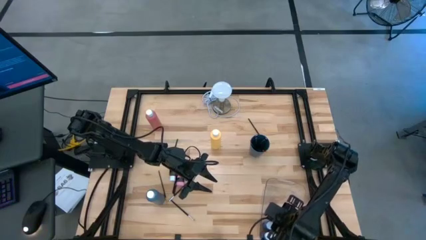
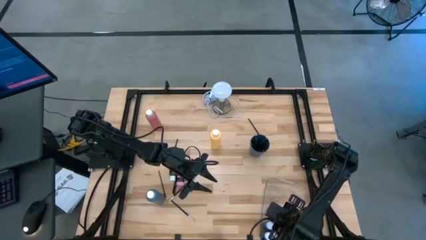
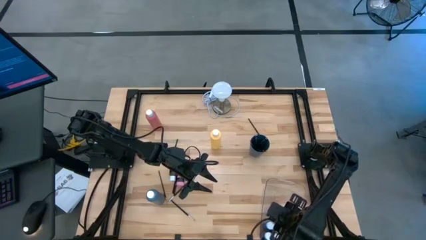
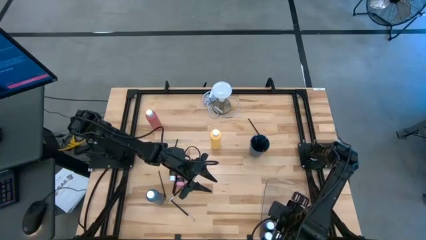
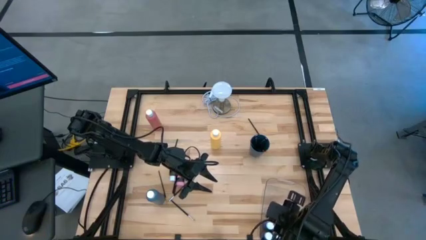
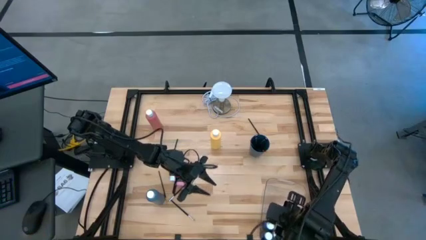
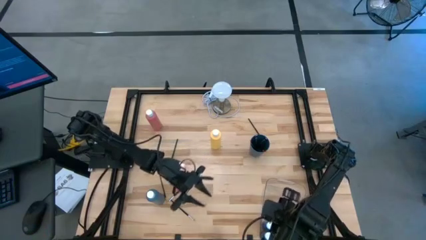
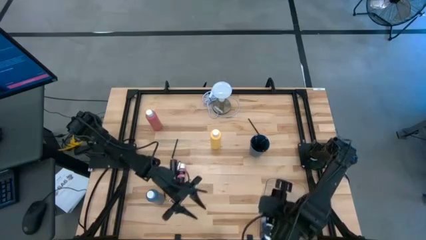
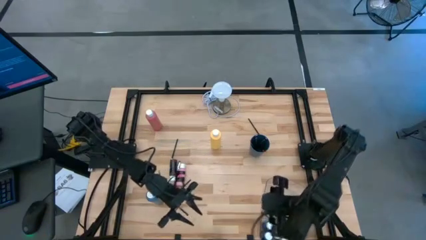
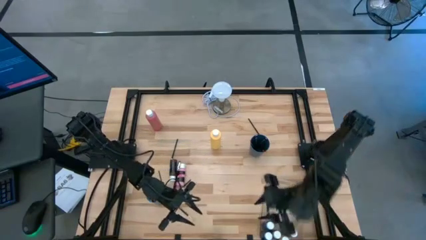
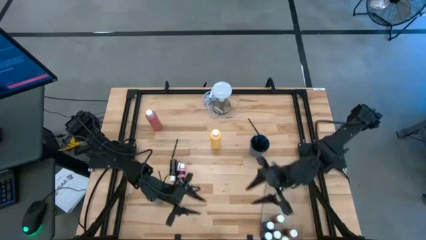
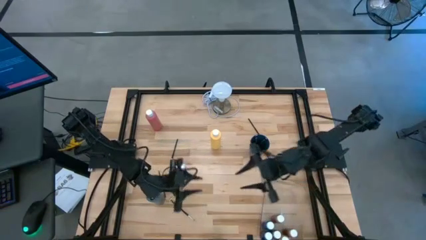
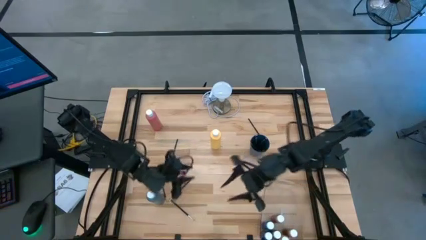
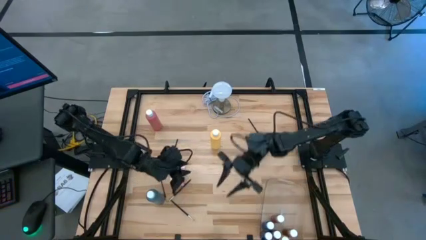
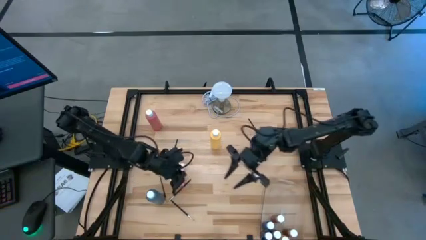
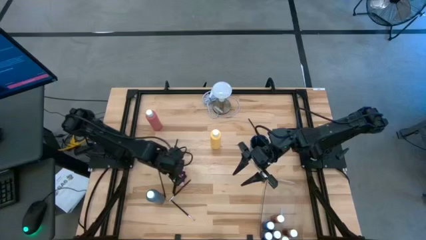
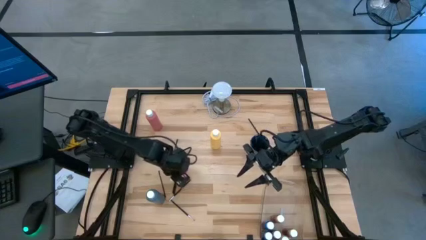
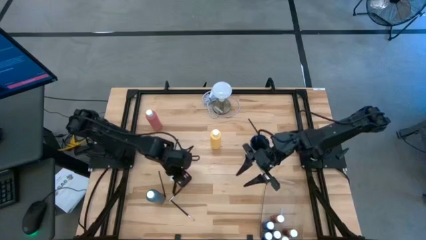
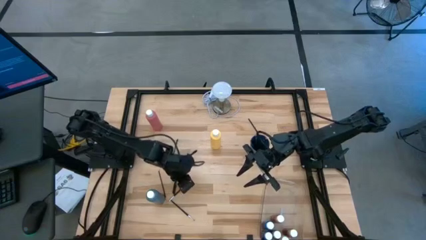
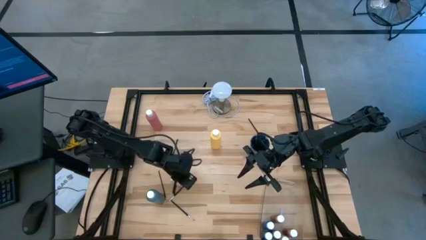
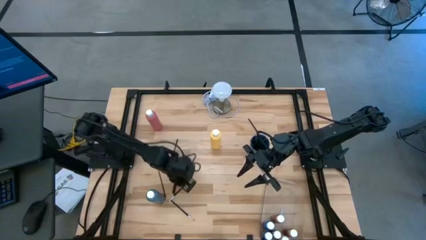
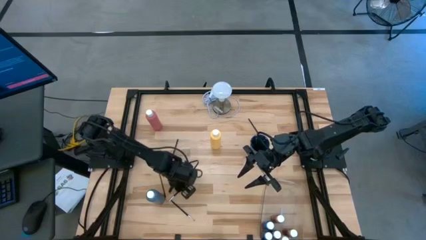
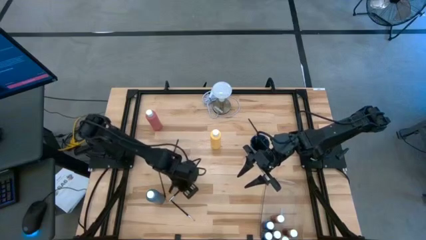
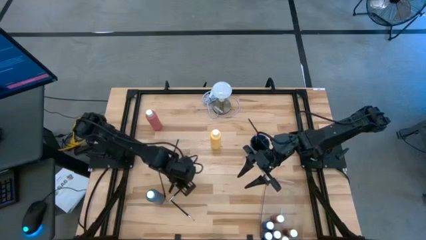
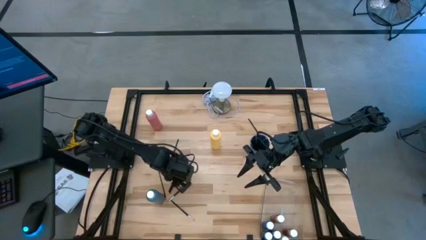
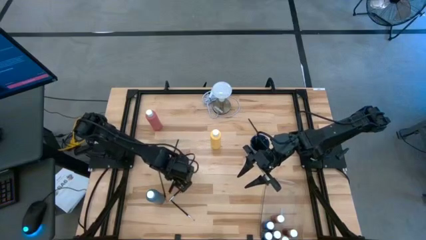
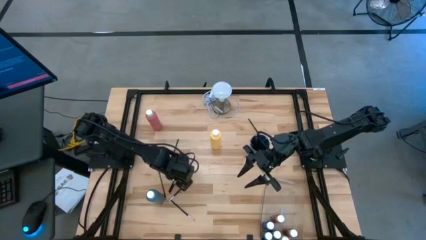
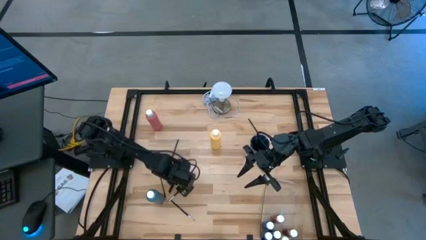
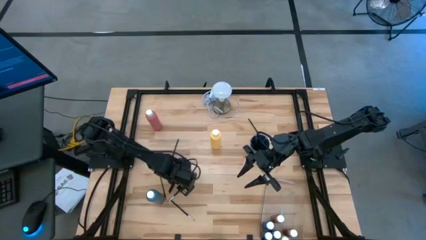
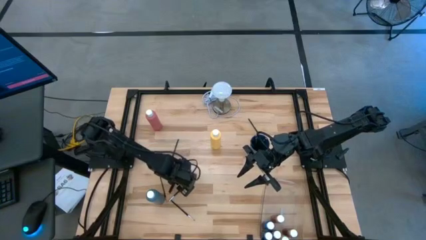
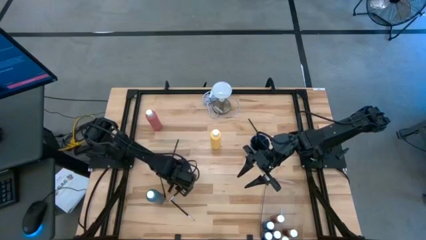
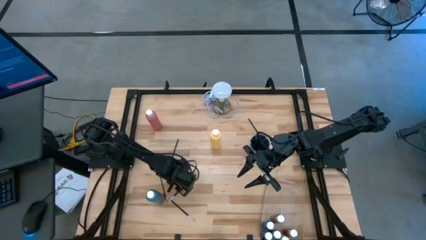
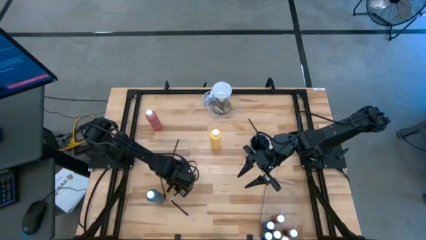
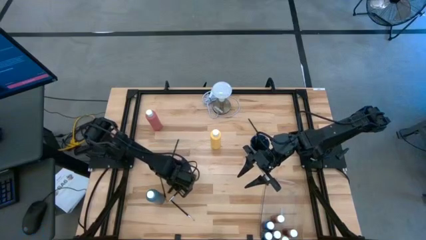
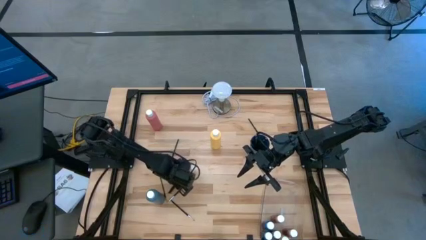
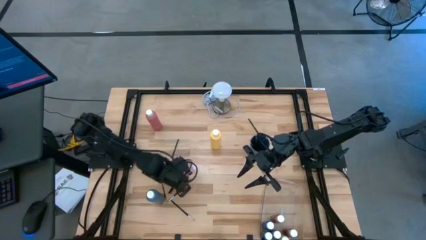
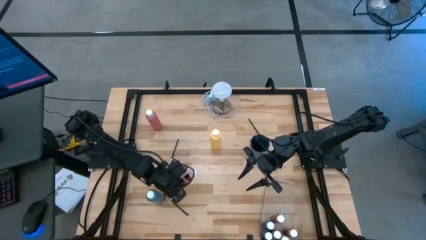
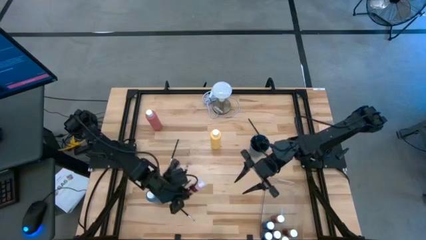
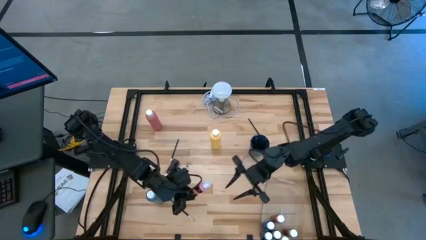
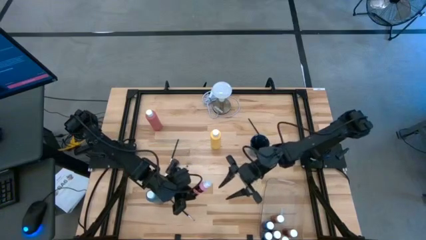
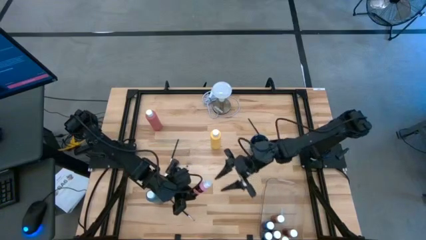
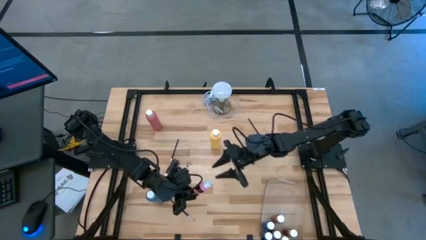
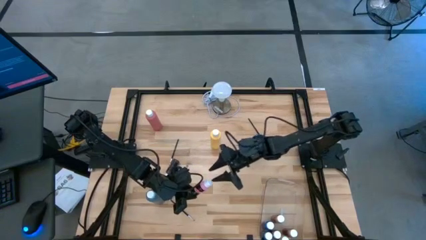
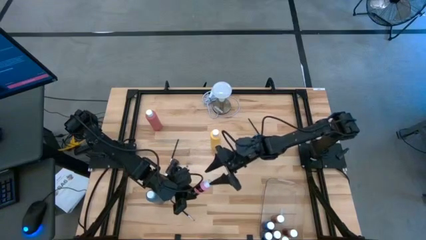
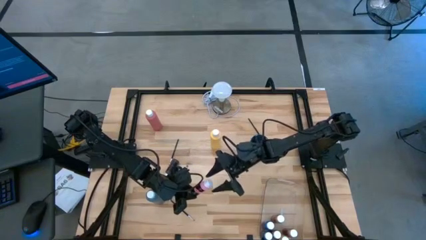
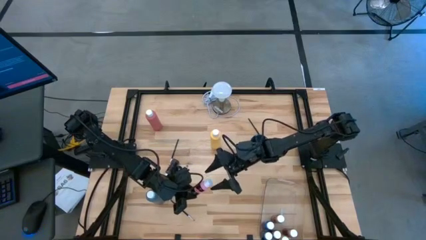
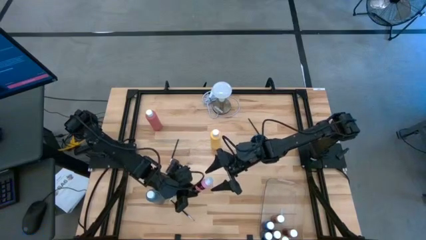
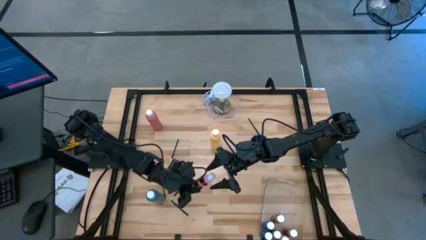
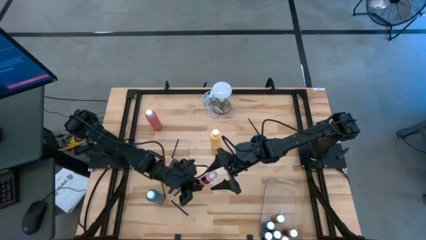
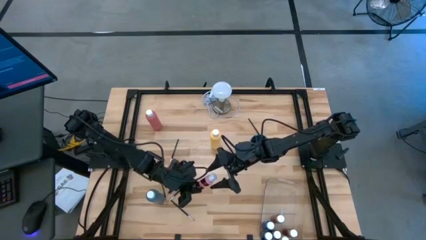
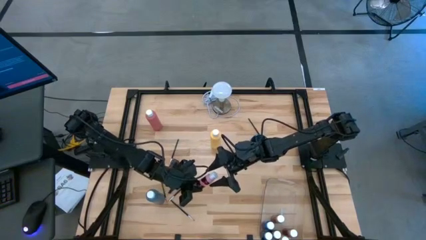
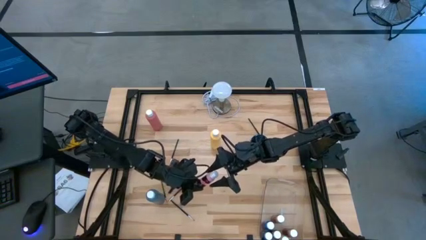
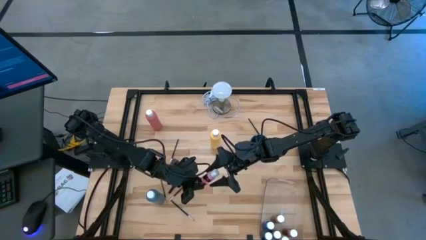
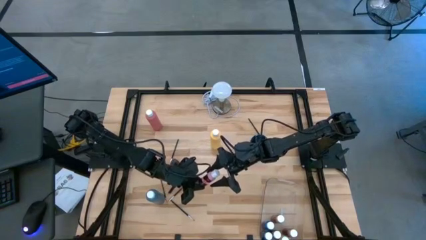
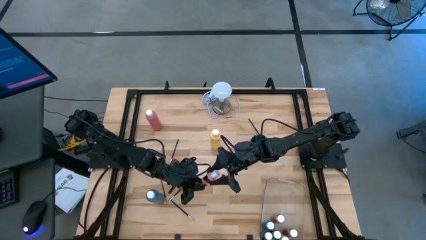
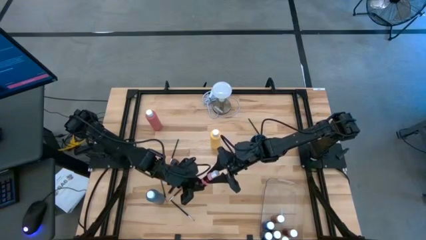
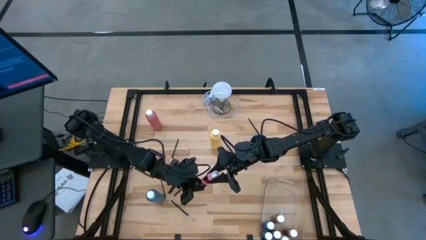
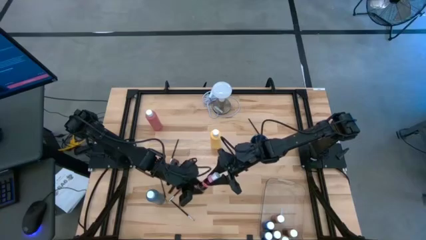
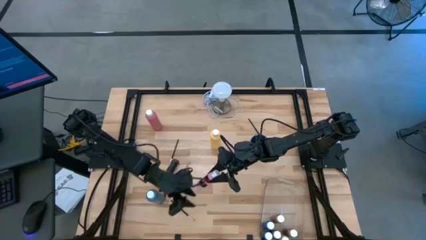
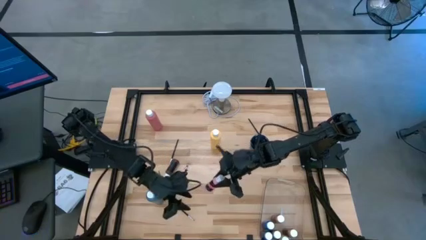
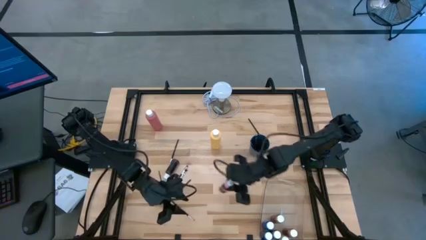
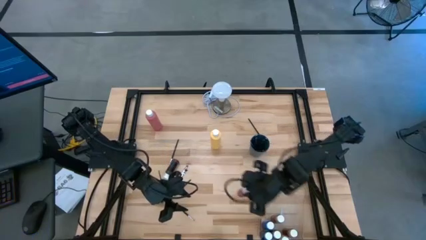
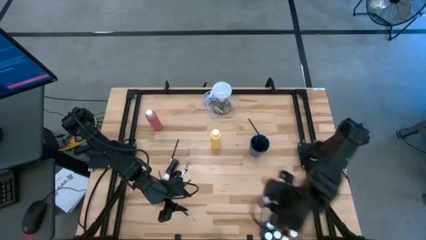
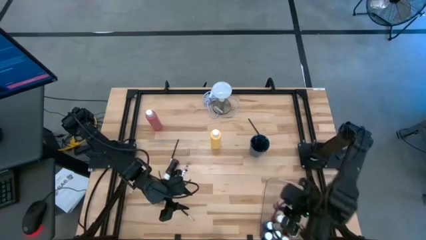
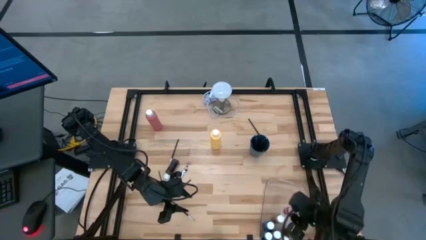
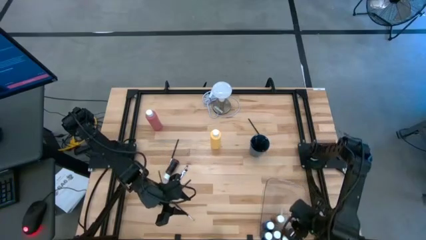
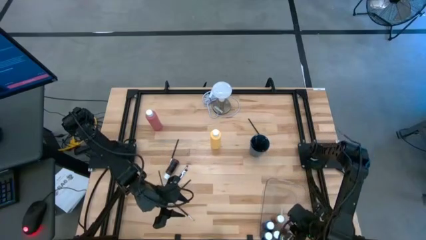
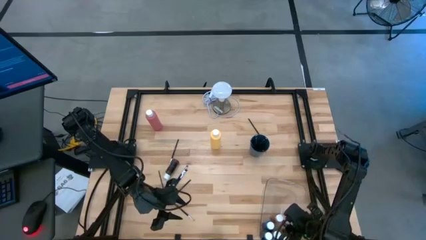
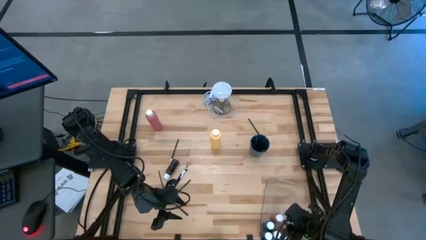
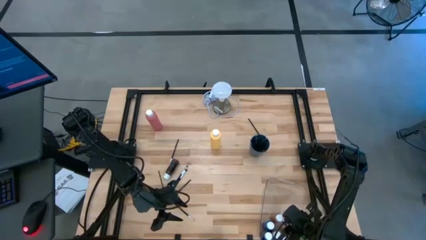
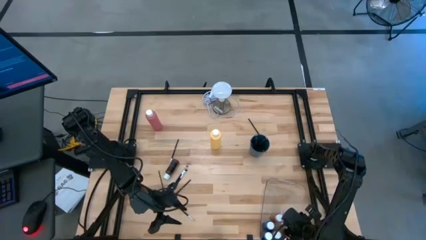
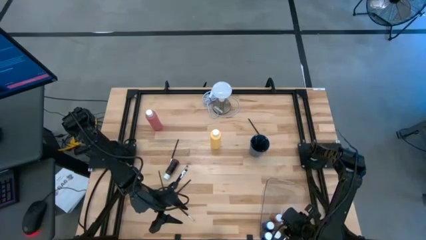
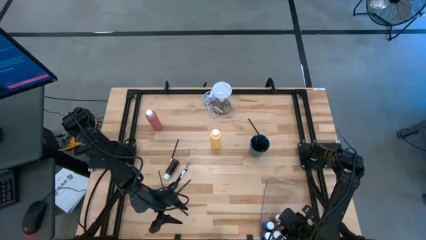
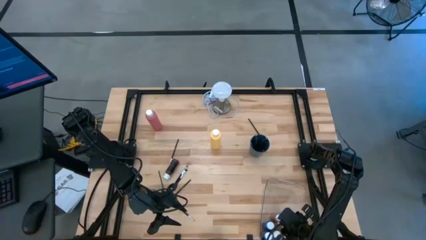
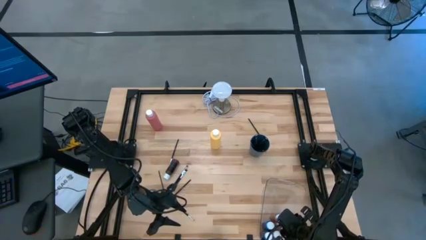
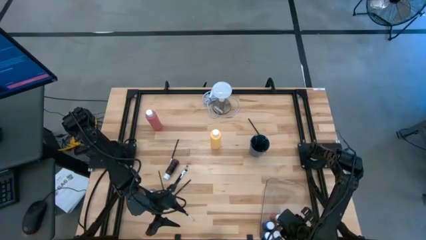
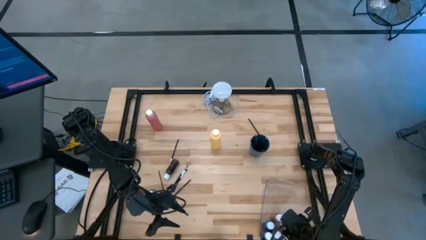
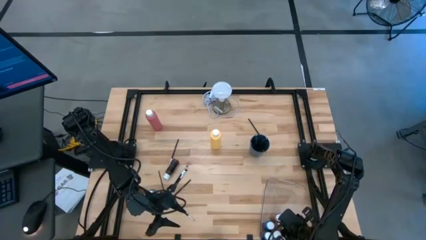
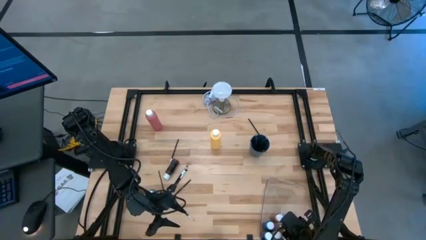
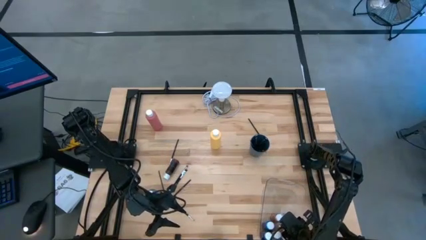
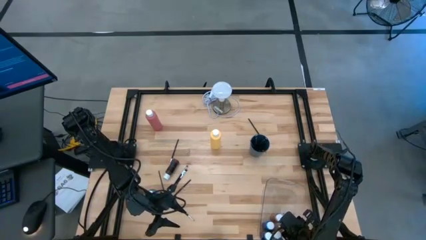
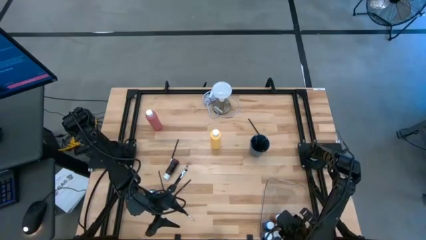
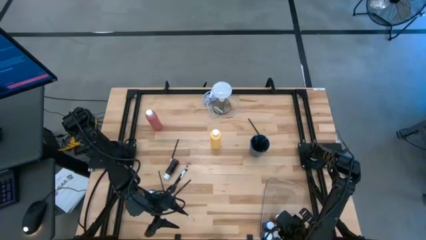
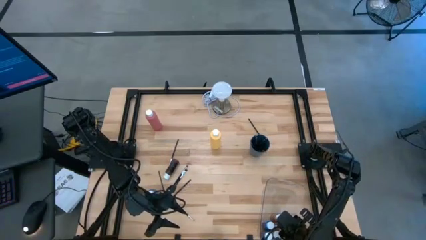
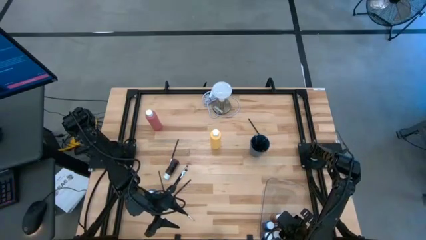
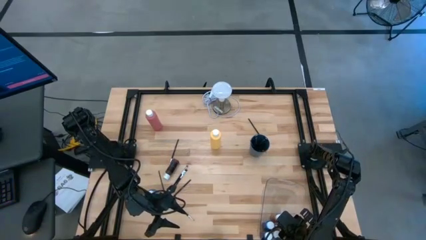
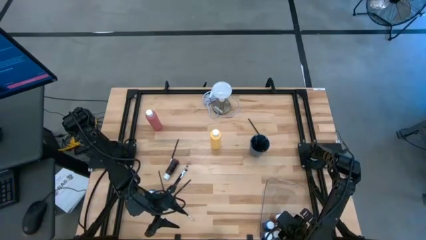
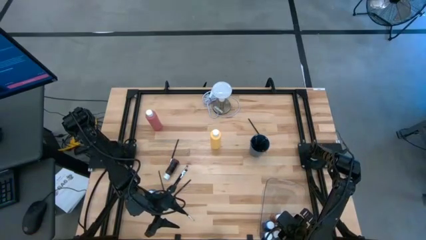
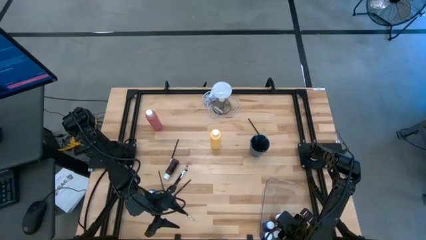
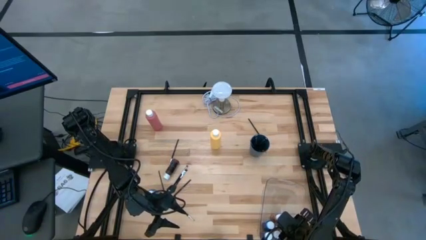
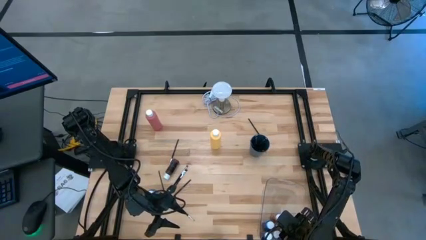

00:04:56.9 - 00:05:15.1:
Task: Pick & Place Paint Supplies
Put the small pink paint bottle into the transparent bin
